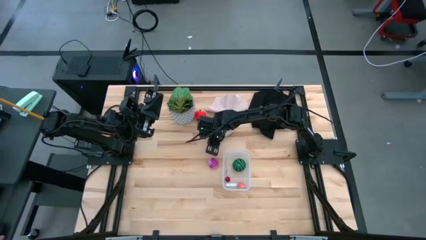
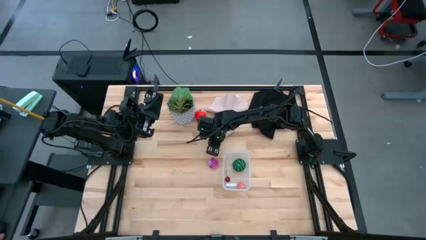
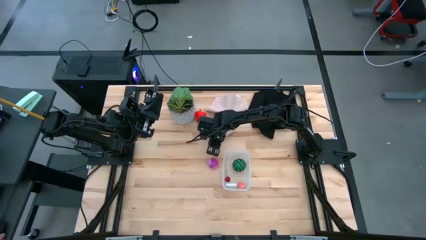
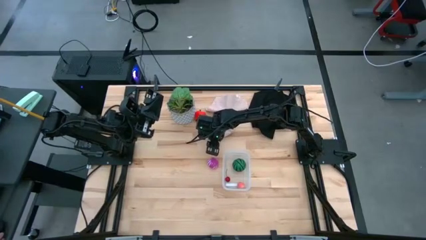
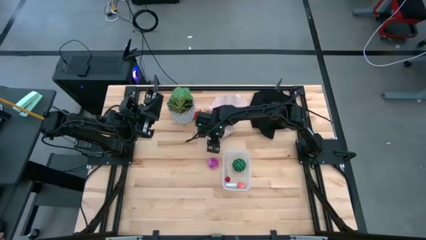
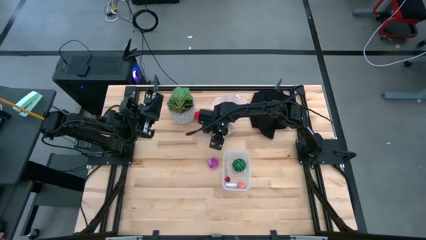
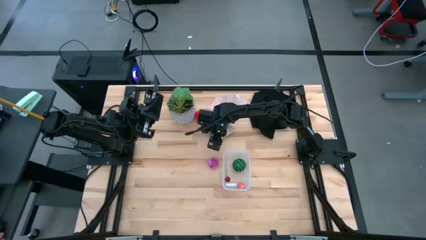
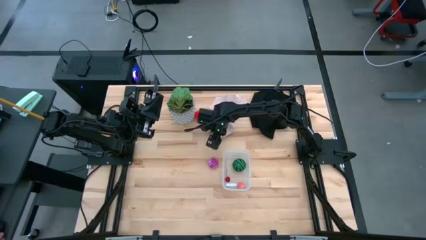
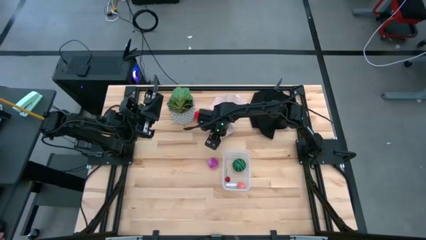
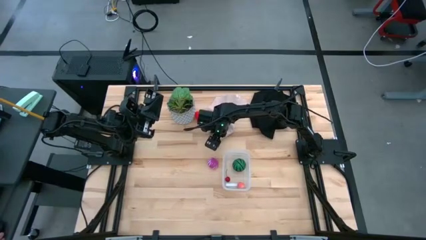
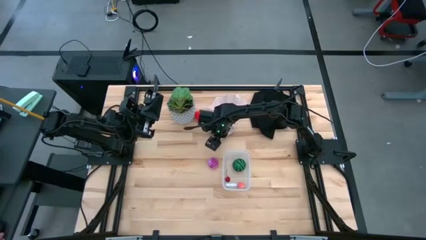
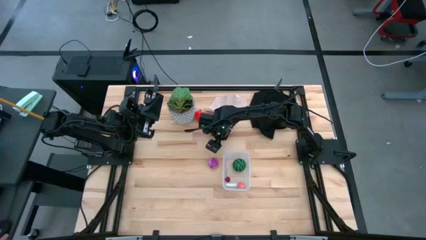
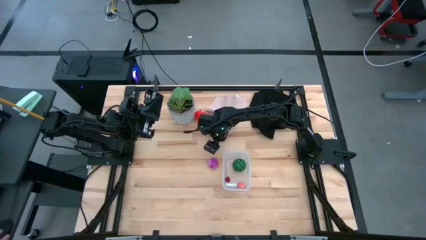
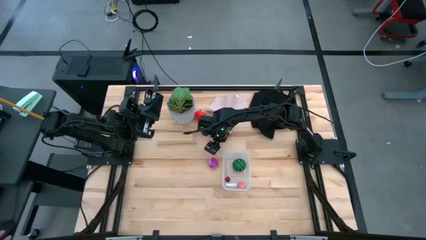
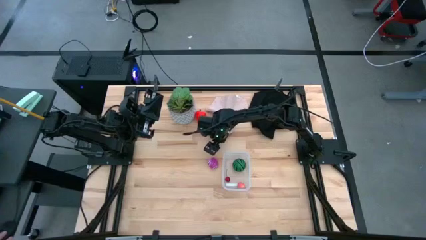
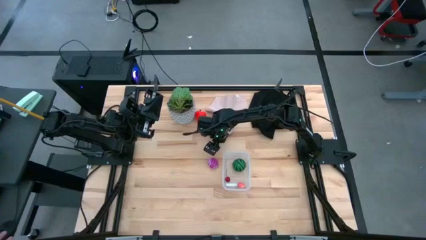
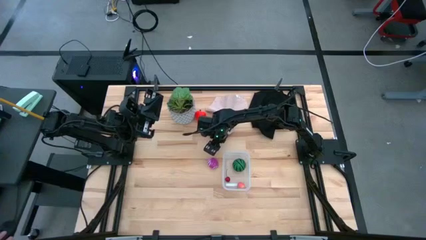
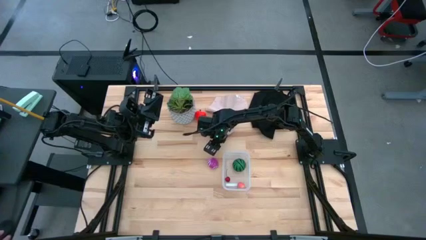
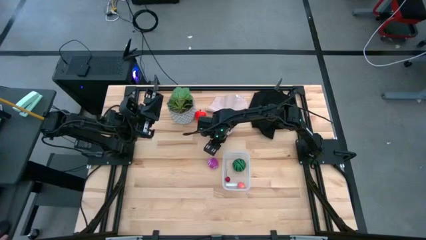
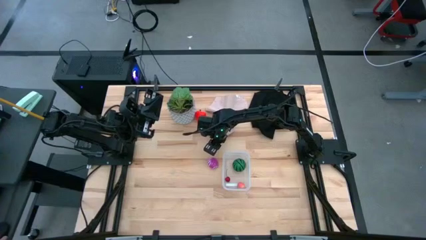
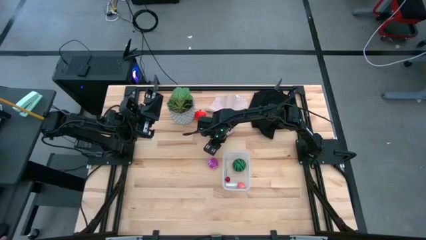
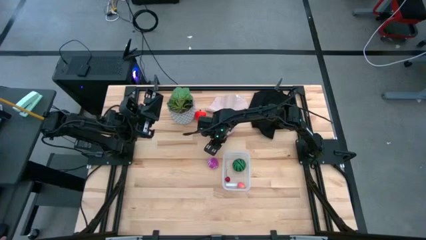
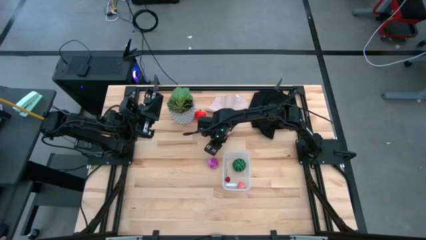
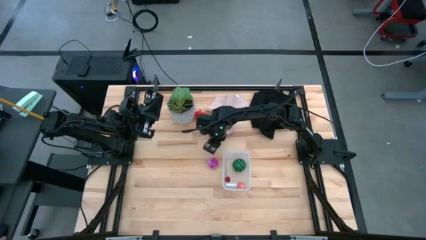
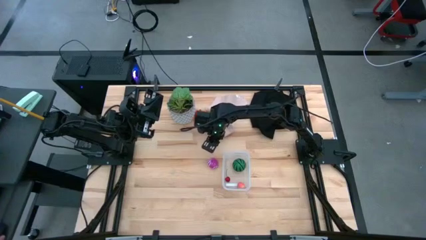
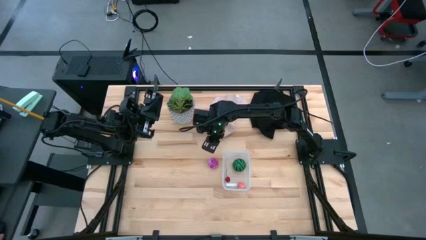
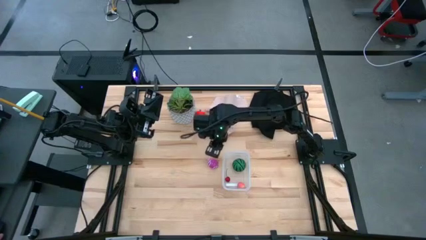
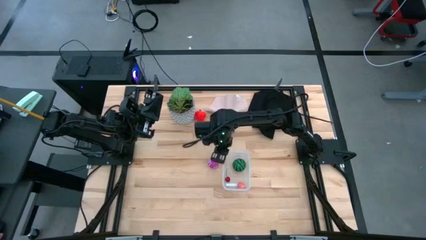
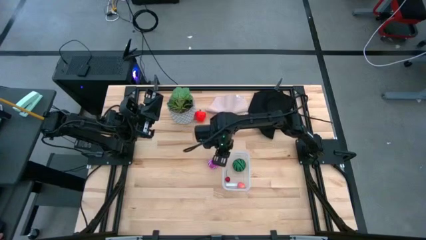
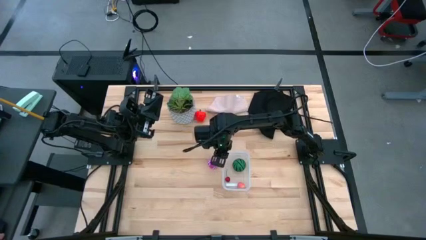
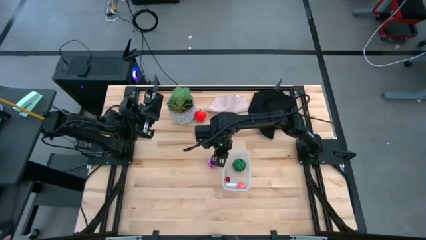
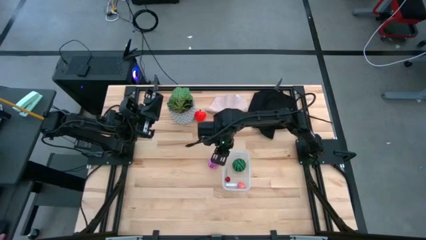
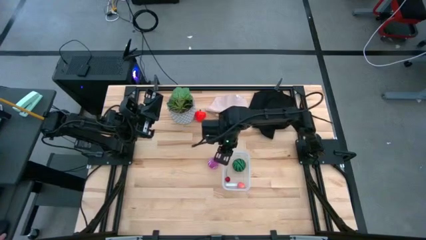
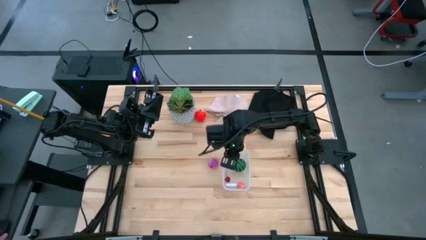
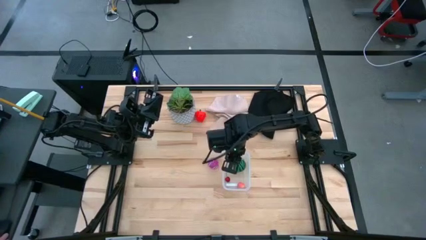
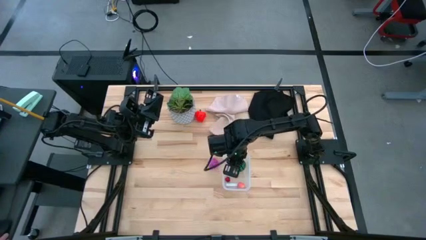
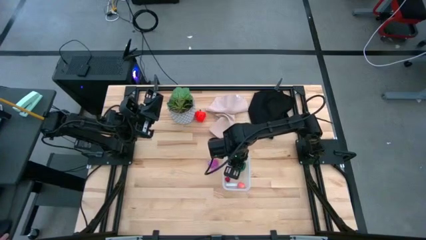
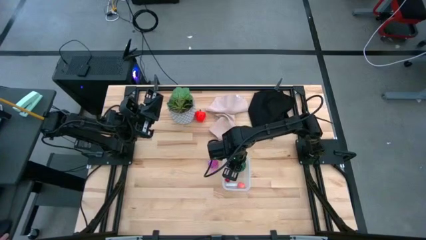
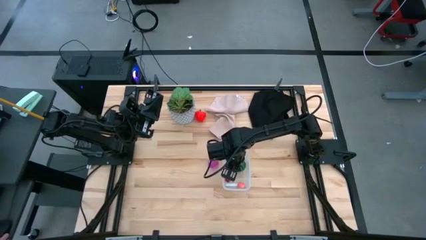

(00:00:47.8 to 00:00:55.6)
Task: Pick and placing Produce into tupperware
Put the black plum into the transparent bin

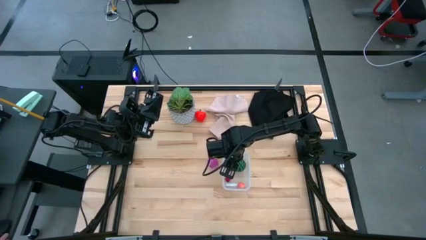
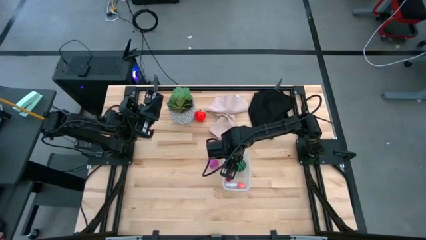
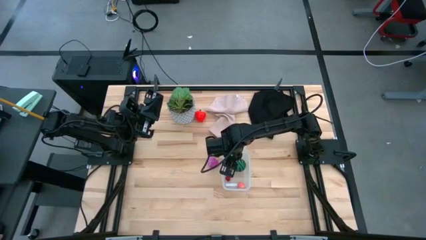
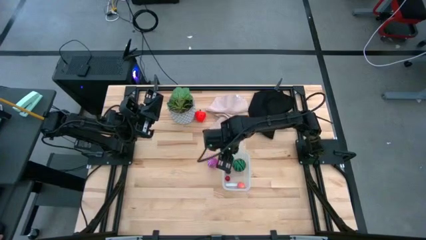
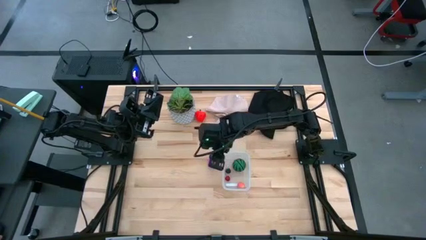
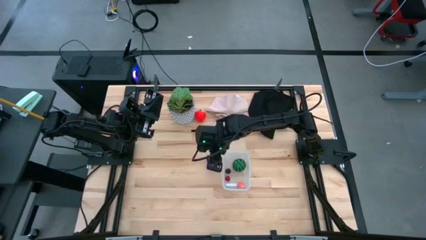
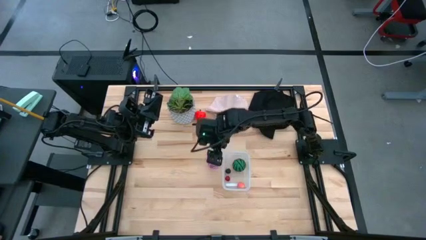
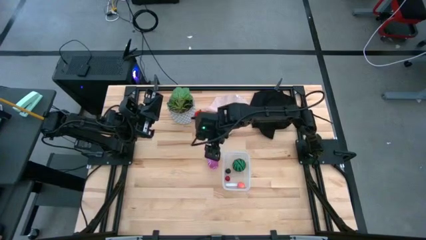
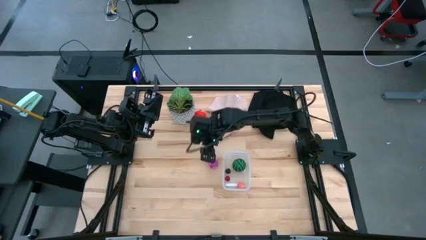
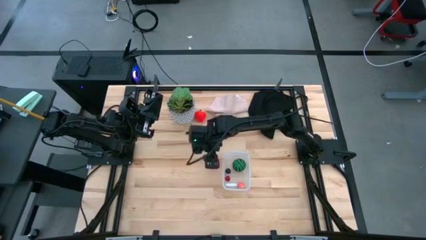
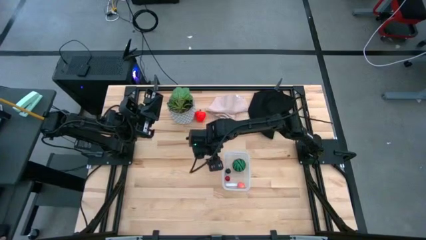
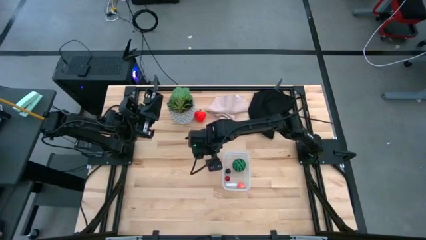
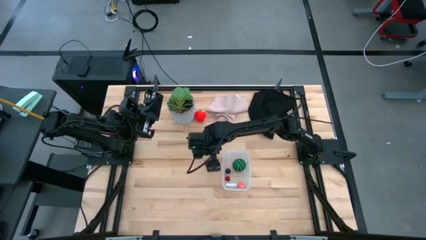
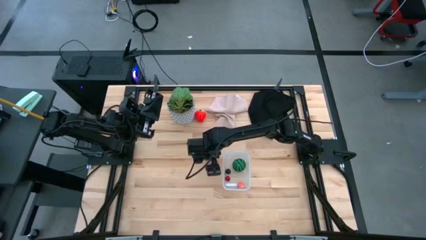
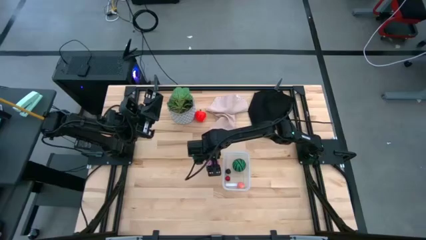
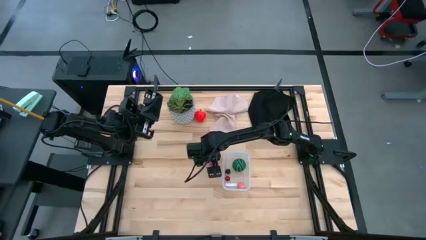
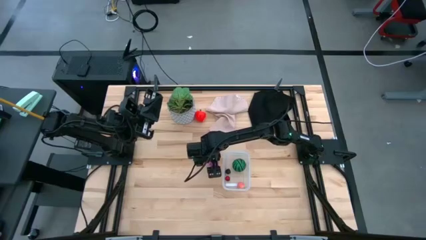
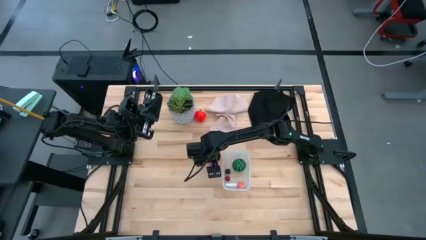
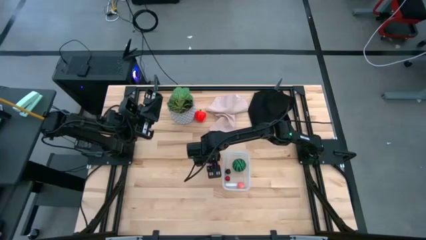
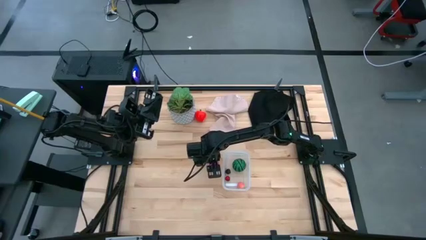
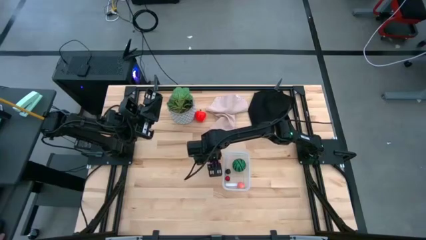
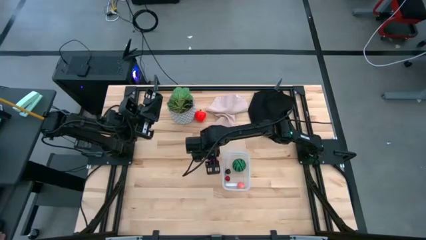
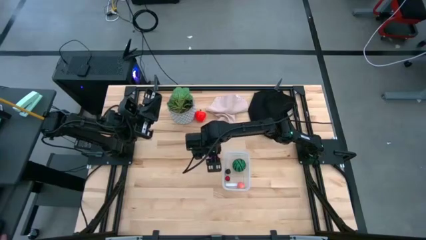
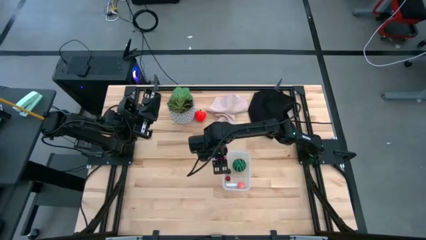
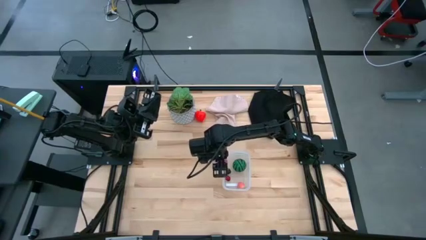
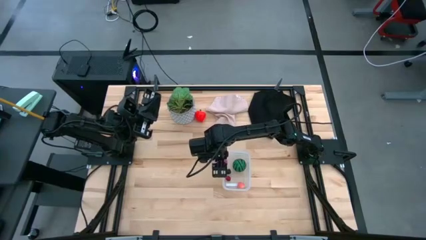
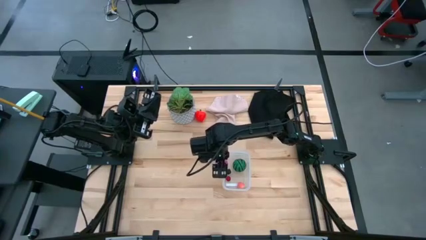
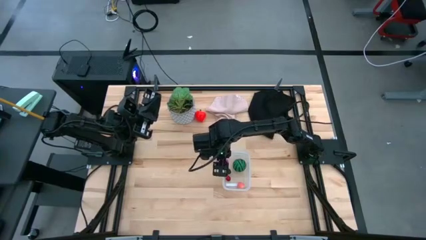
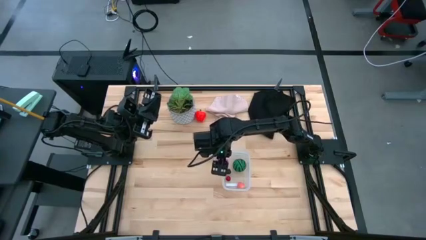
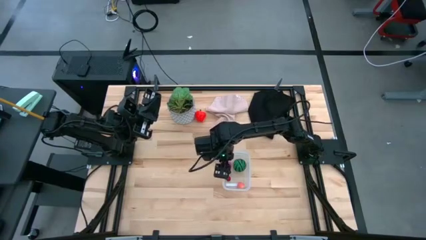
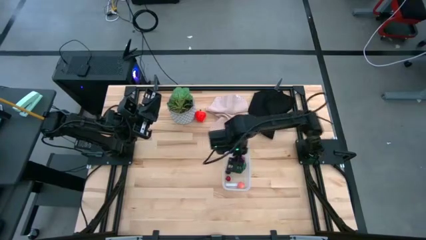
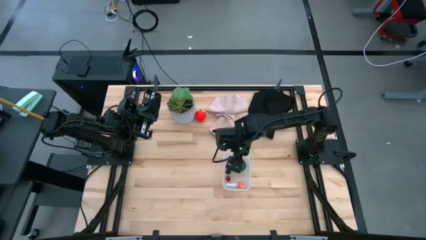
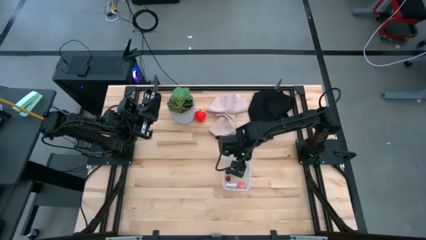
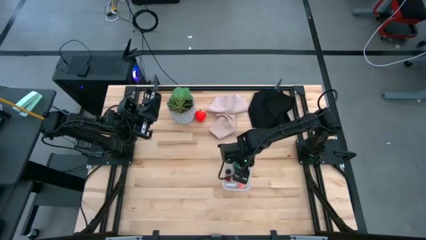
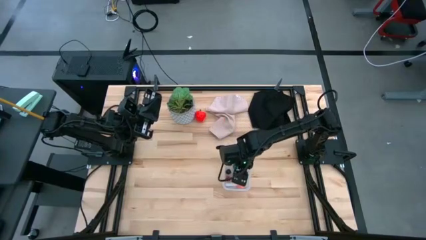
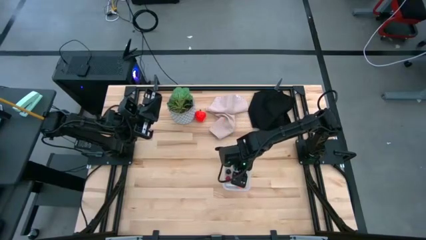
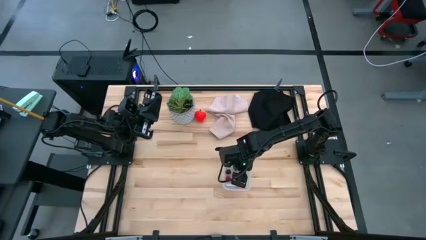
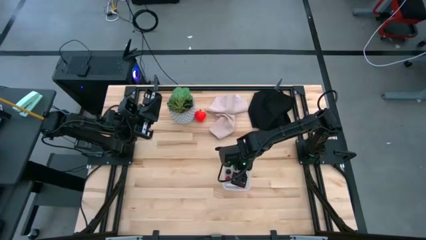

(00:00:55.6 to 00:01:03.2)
Put the purple onion into the transparent bin
